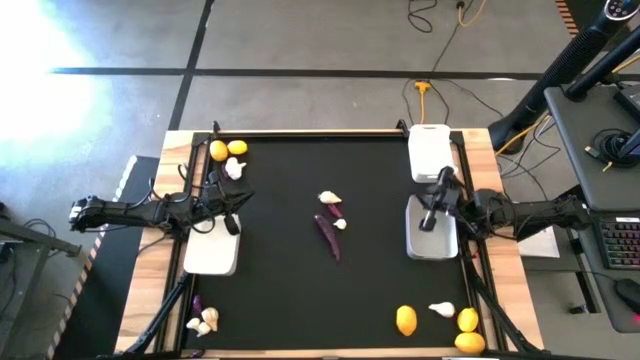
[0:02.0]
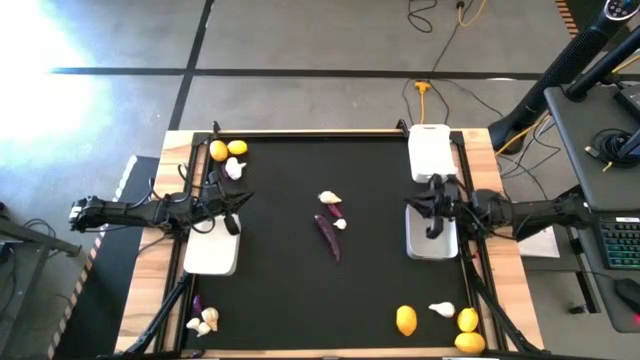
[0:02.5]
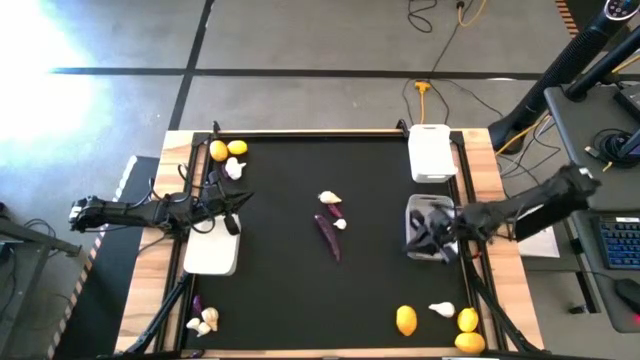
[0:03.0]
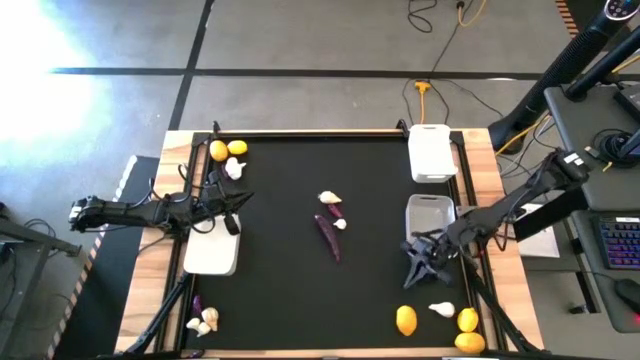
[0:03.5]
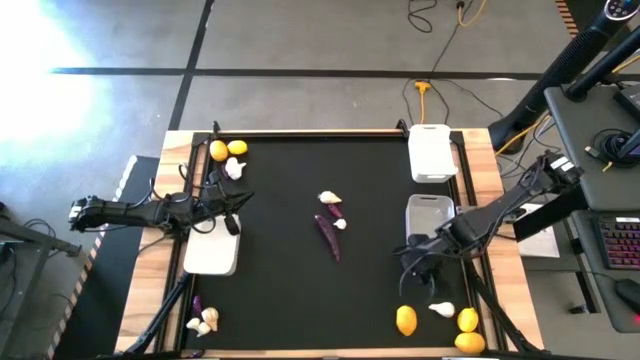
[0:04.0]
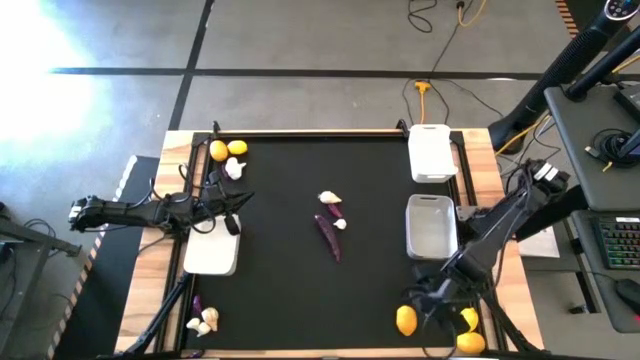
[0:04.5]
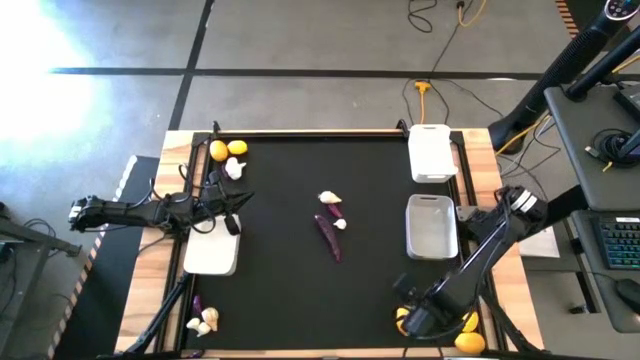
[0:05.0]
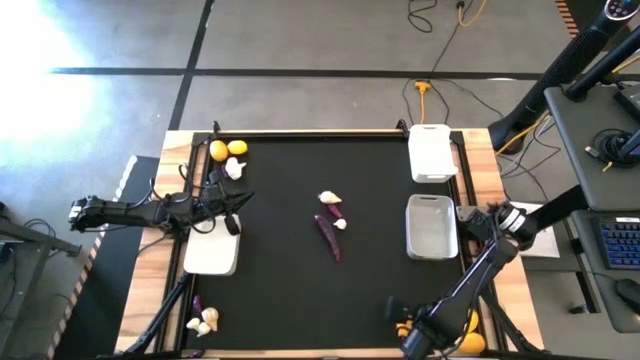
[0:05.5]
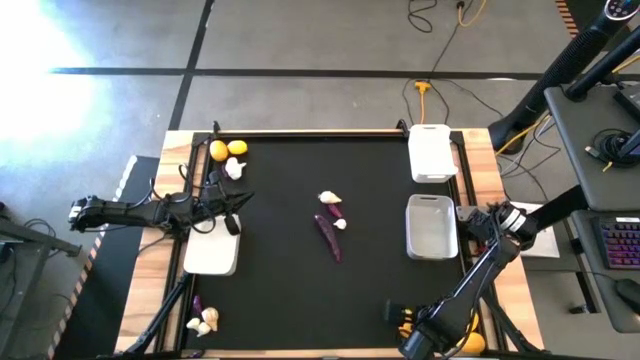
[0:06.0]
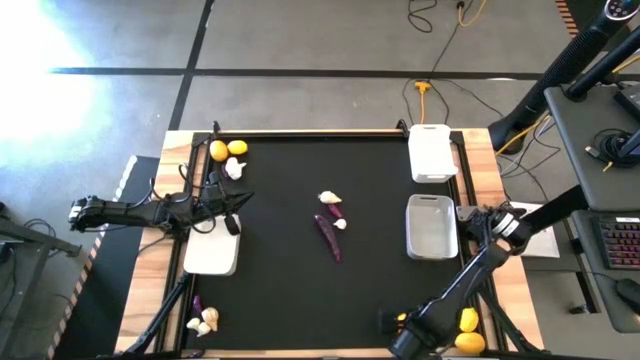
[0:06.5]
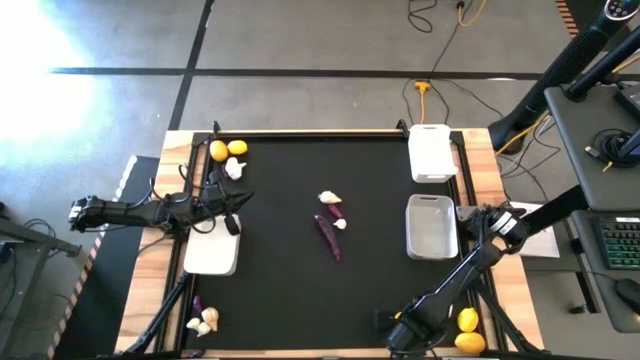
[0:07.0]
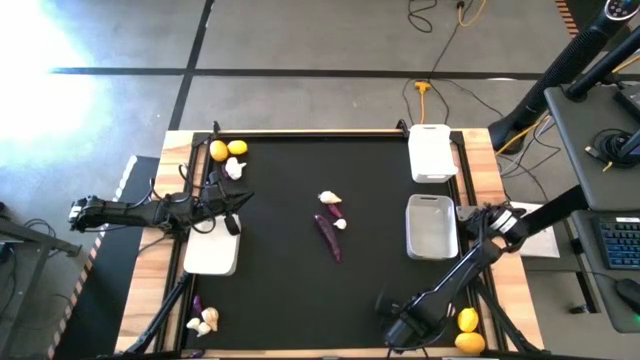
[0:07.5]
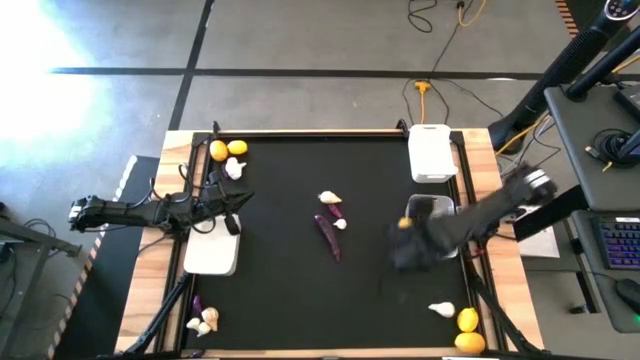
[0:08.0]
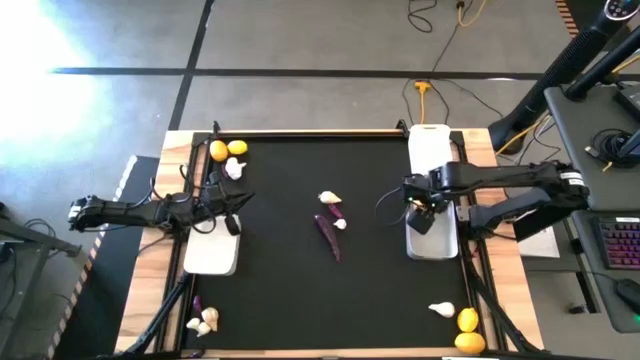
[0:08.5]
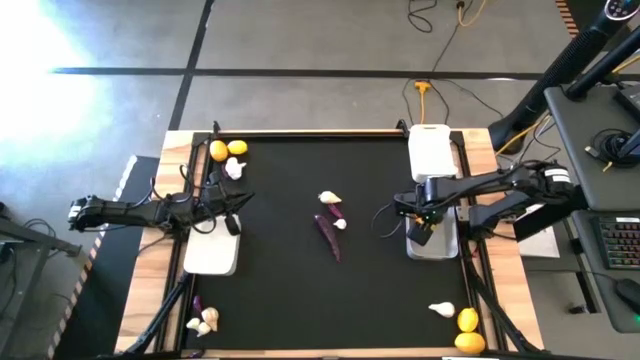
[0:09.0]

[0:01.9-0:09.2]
Task: Sort produce into baskets
Put the lemon into the gray bin

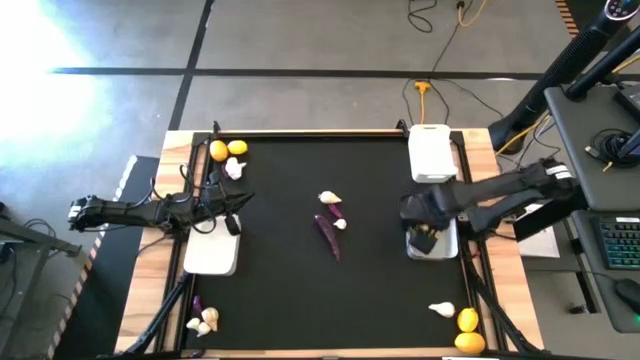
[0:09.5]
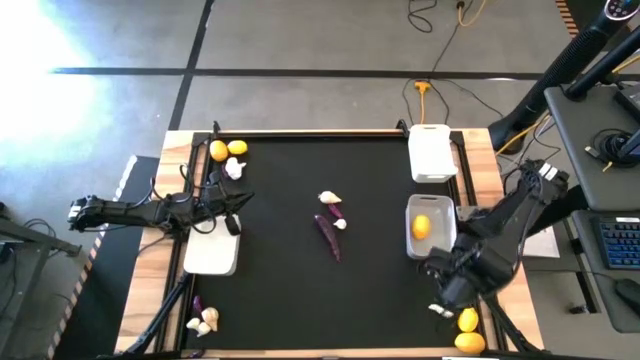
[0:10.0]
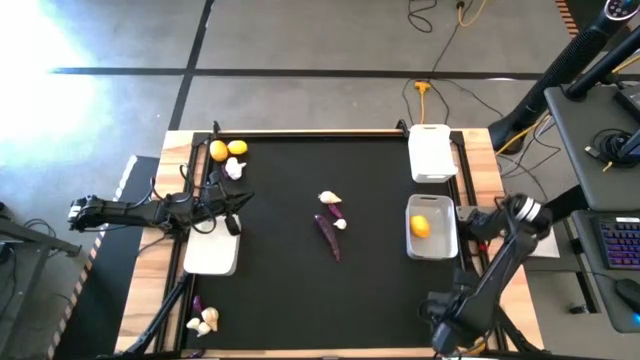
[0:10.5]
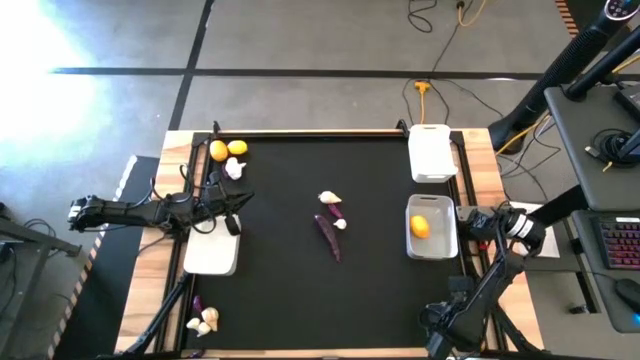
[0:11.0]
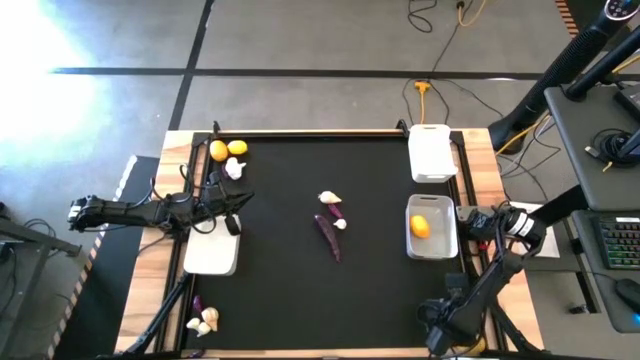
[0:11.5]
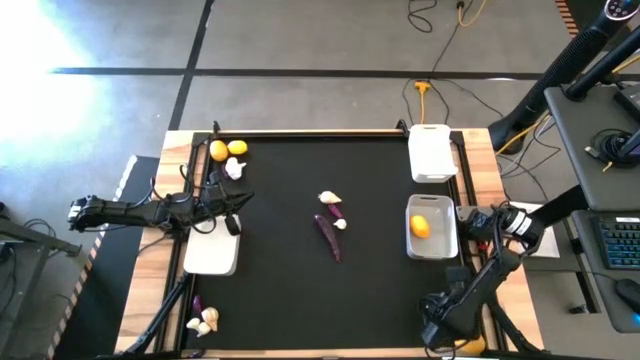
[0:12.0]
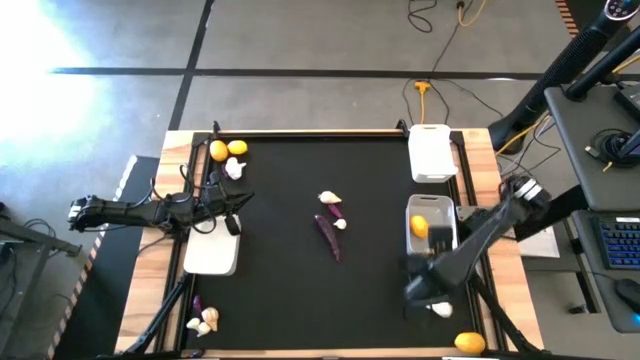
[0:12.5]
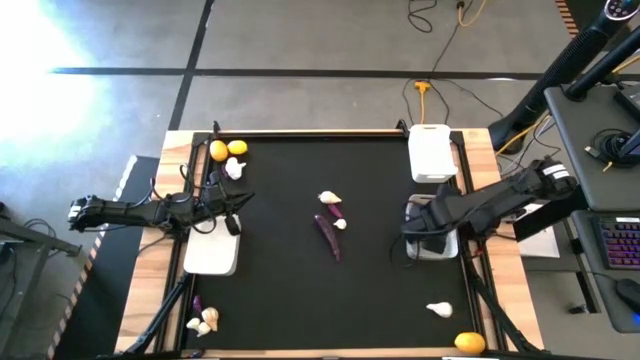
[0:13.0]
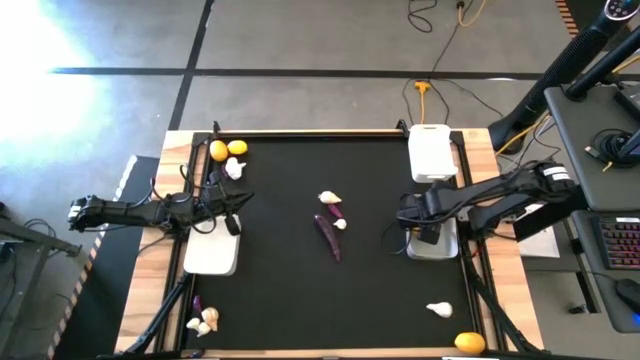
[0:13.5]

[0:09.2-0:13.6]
Put the lemon into the gray bin

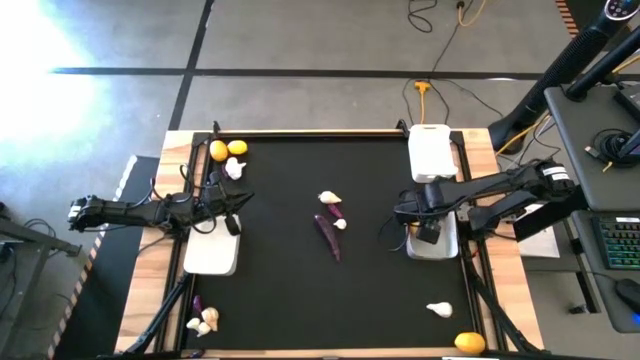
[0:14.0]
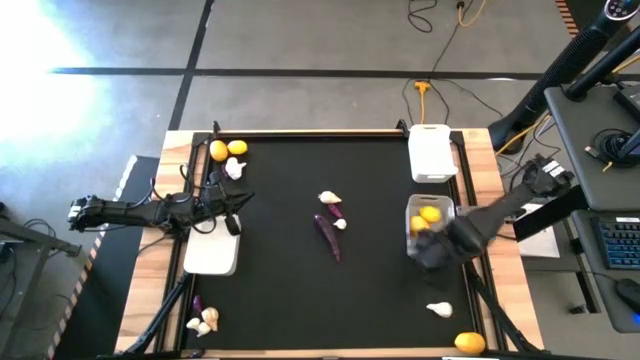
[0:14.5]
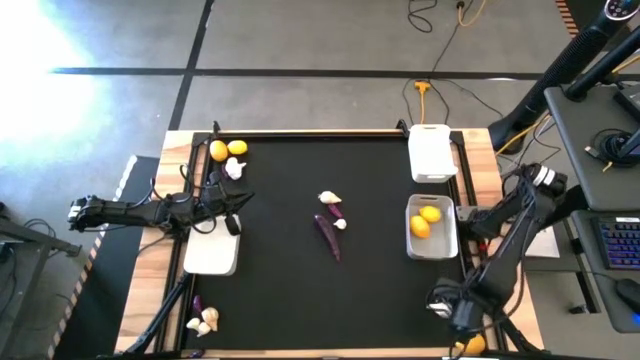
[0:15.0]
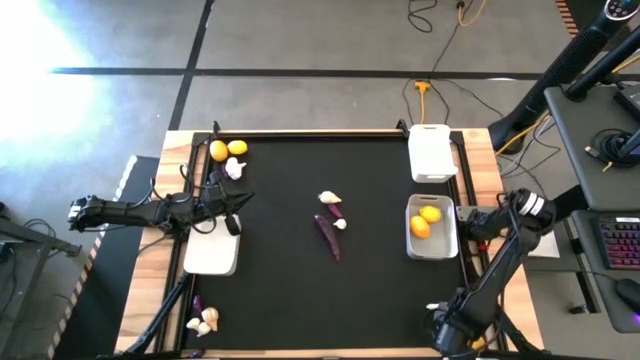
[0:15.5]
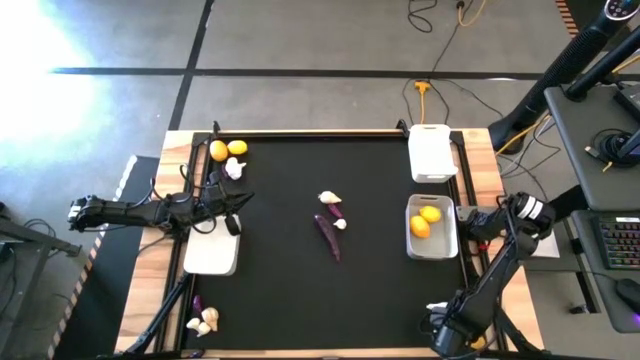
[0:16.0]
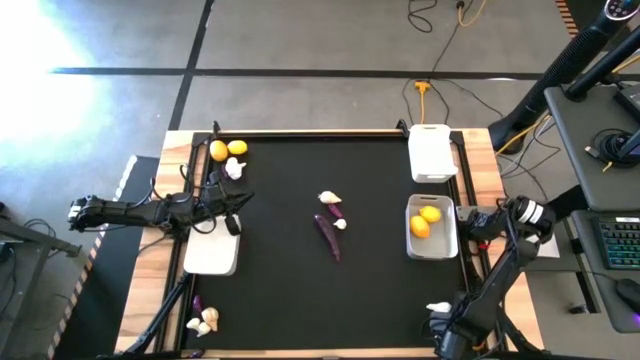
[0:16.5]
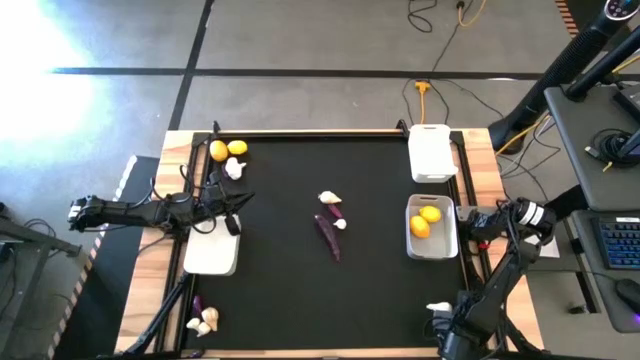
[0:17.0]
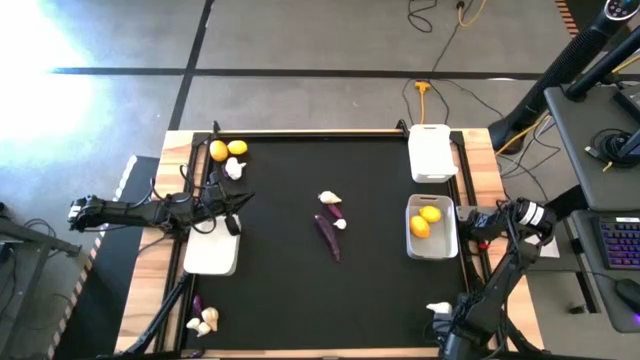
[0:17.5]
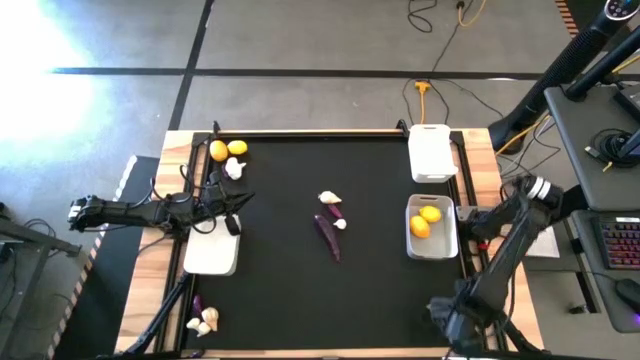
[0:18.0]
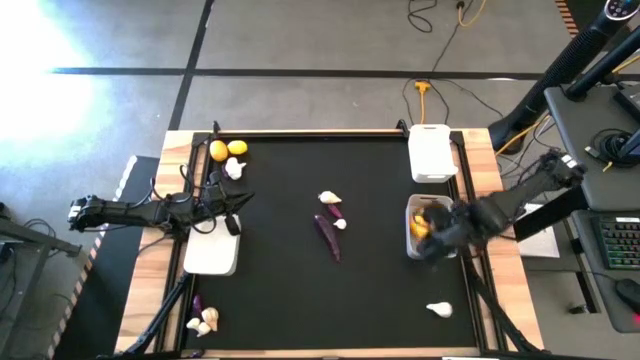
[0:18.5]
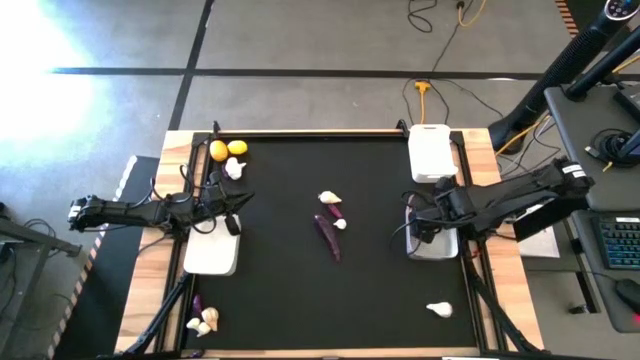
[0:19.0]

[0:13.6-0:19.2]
Put the lemon into the gray bin

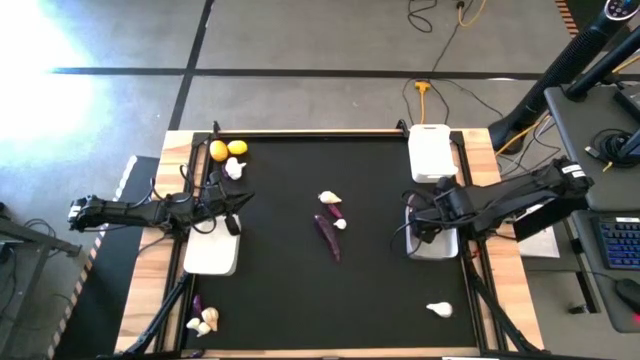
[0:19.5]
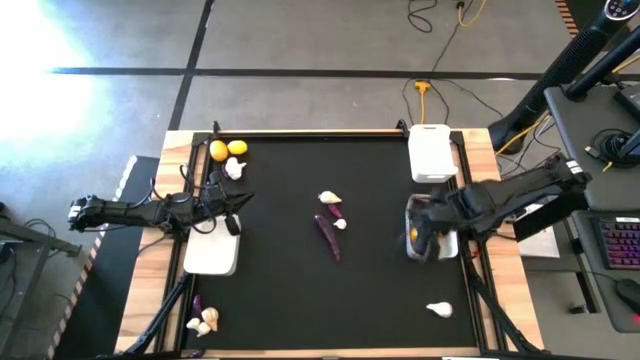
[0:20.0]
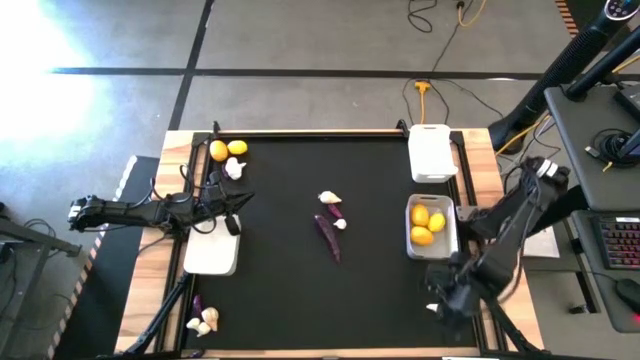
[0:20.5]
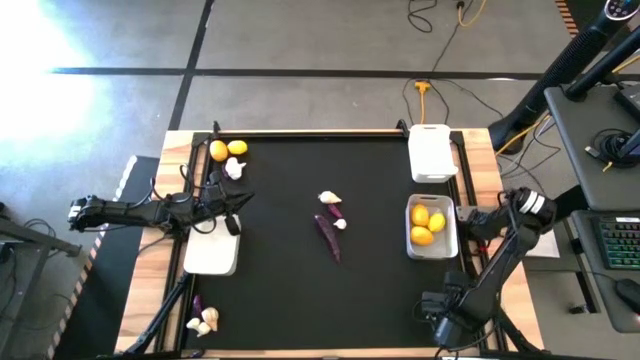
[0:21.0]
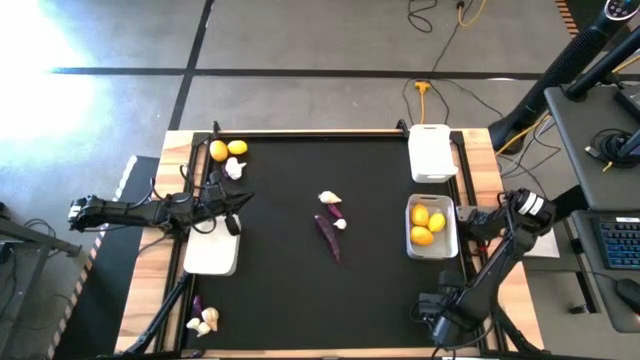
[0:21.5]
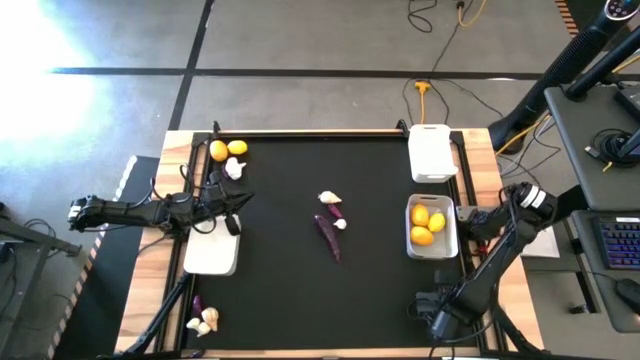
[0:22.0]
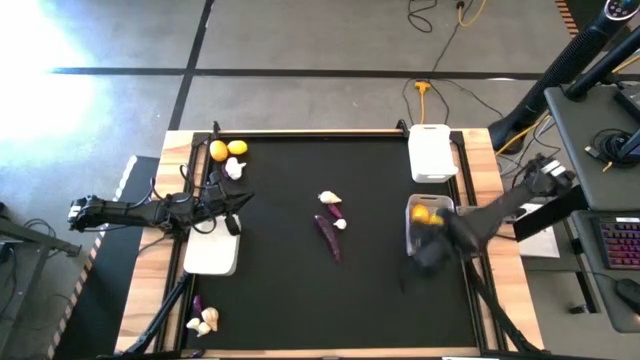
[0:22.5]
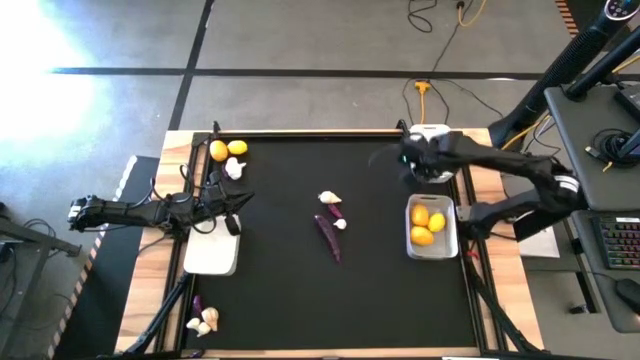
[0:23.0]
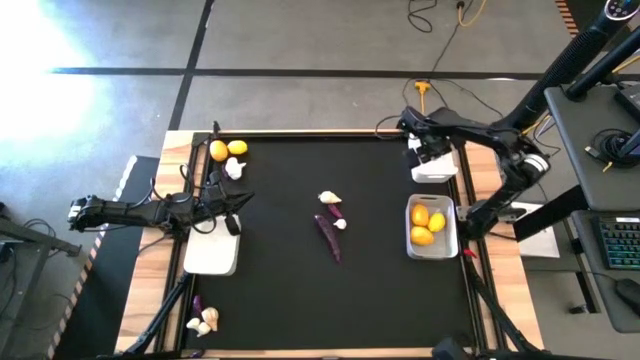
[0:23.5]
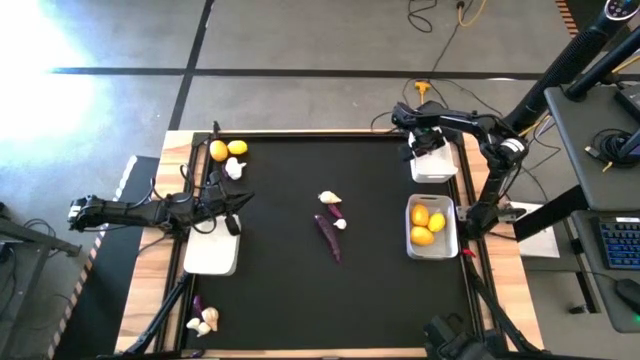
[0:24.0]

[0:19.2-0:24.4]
Put the garlic into the top white bin
